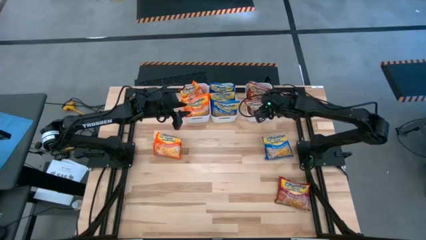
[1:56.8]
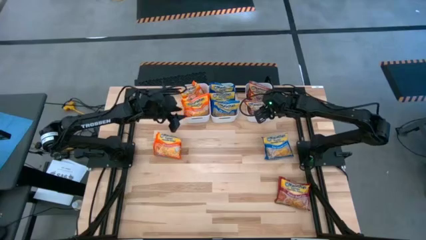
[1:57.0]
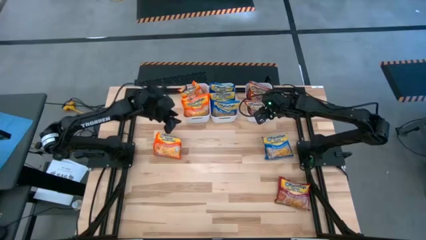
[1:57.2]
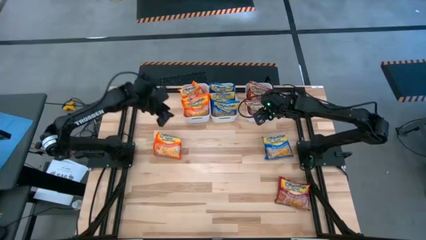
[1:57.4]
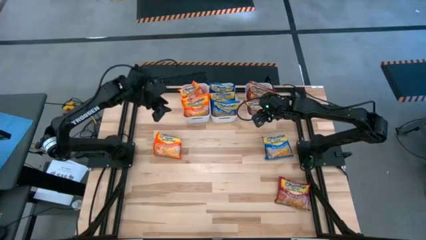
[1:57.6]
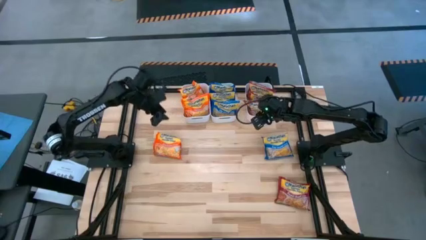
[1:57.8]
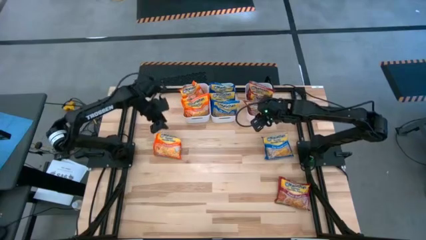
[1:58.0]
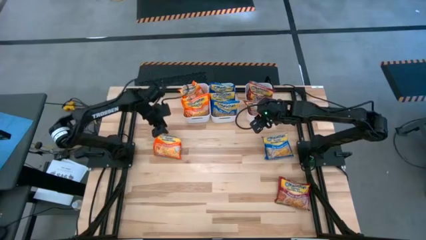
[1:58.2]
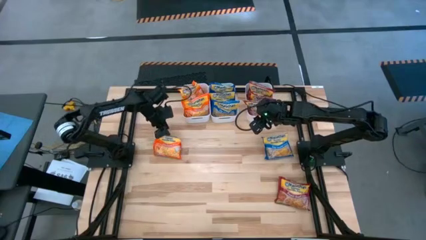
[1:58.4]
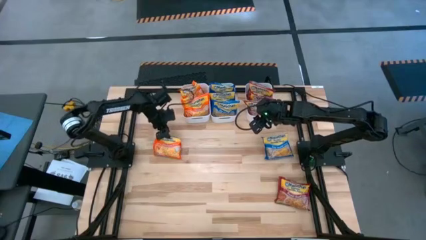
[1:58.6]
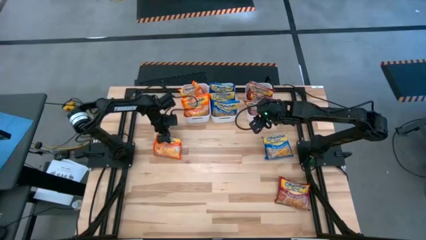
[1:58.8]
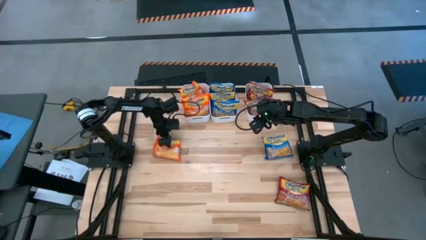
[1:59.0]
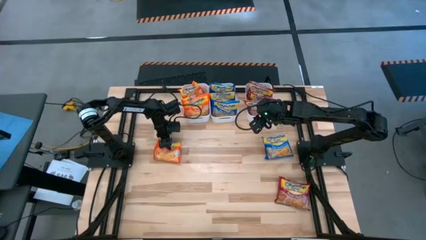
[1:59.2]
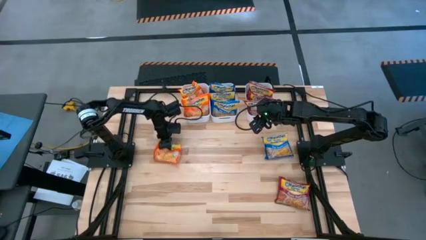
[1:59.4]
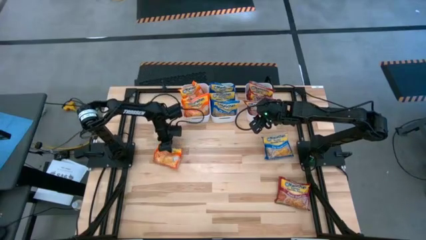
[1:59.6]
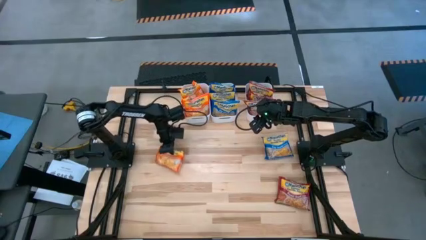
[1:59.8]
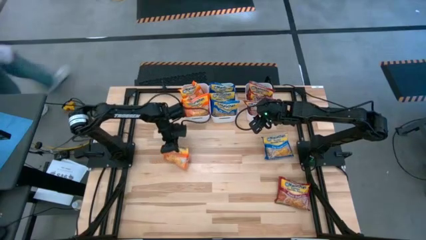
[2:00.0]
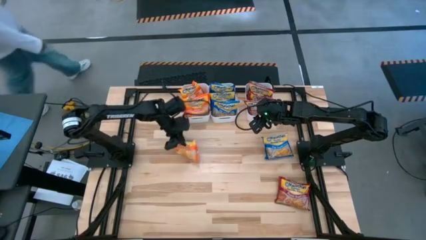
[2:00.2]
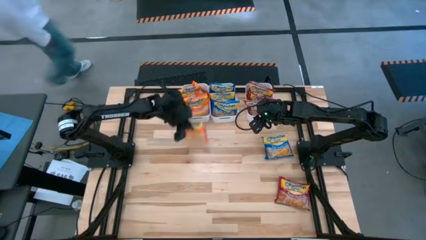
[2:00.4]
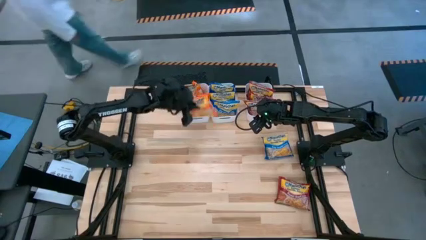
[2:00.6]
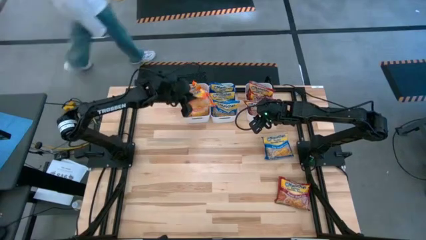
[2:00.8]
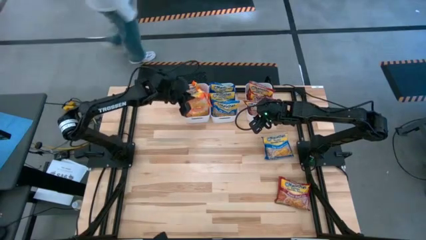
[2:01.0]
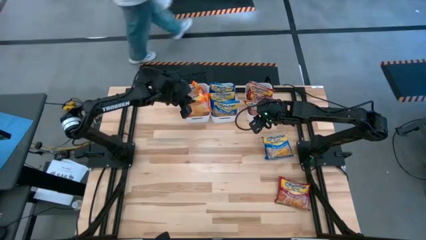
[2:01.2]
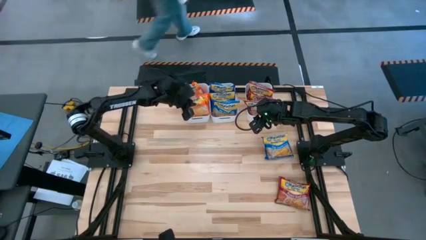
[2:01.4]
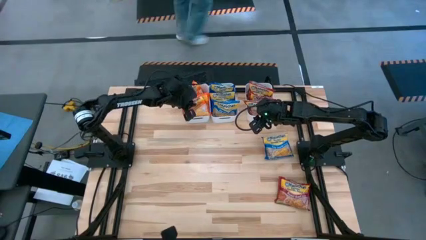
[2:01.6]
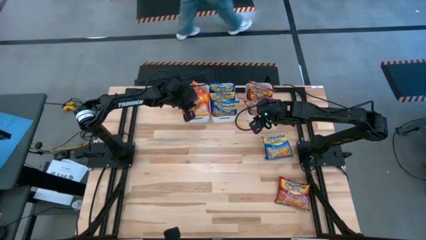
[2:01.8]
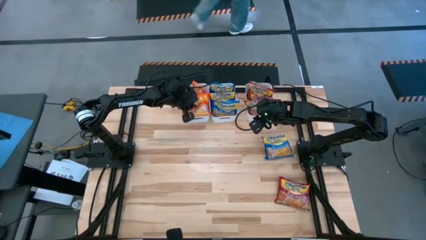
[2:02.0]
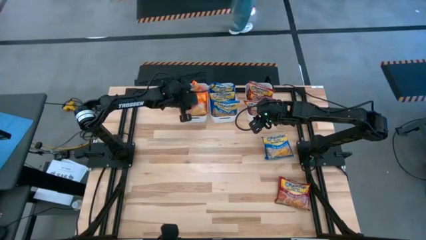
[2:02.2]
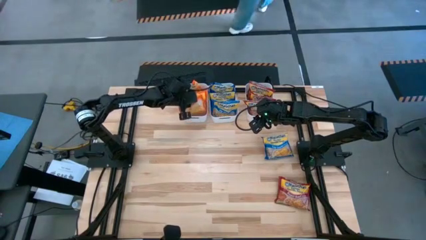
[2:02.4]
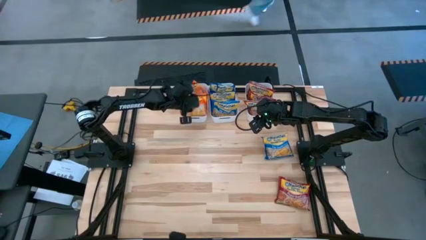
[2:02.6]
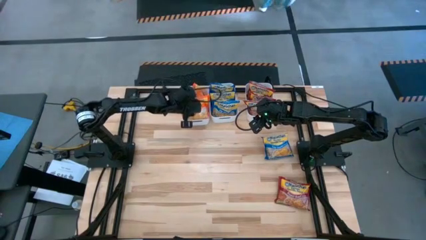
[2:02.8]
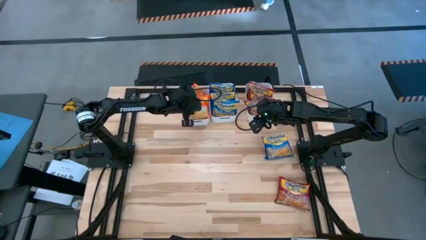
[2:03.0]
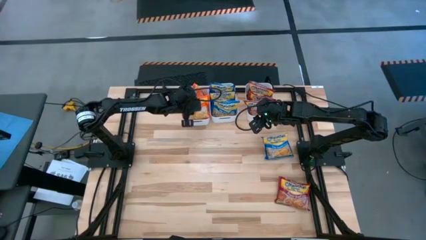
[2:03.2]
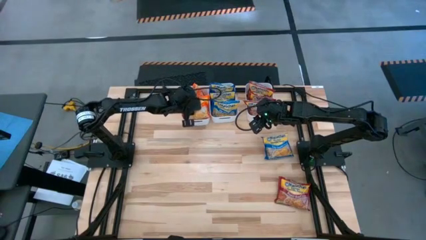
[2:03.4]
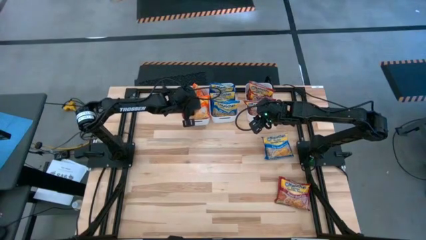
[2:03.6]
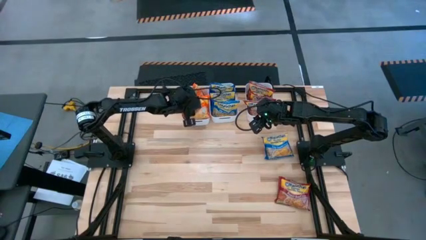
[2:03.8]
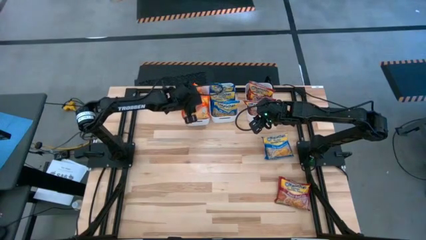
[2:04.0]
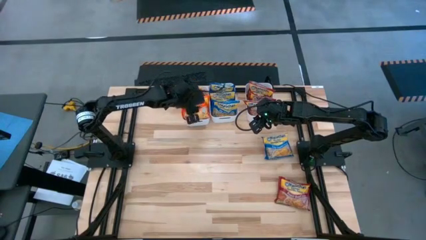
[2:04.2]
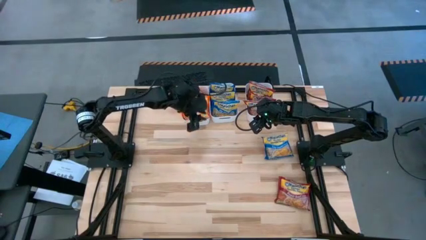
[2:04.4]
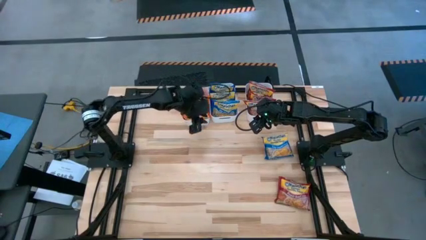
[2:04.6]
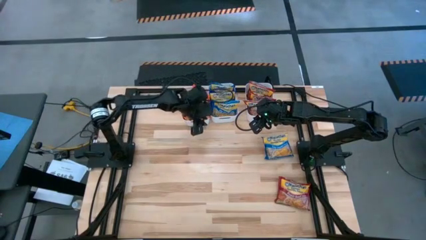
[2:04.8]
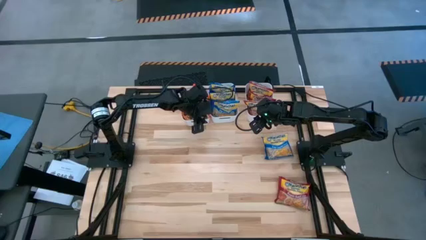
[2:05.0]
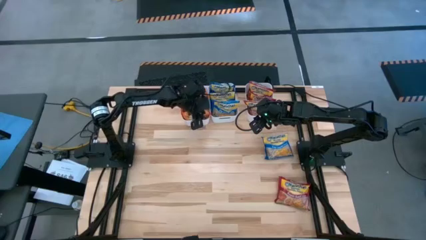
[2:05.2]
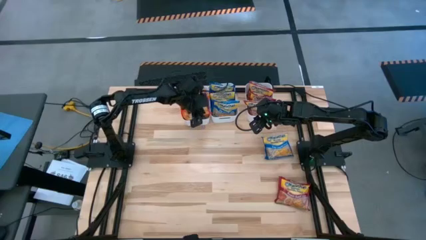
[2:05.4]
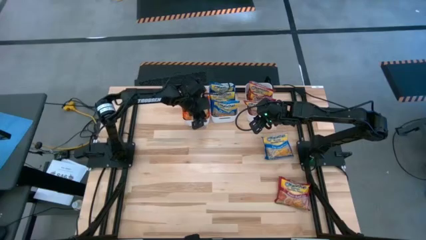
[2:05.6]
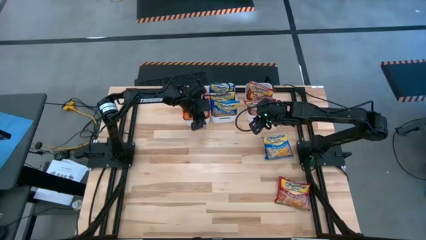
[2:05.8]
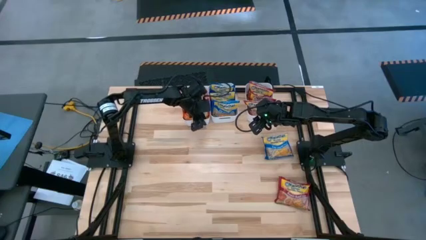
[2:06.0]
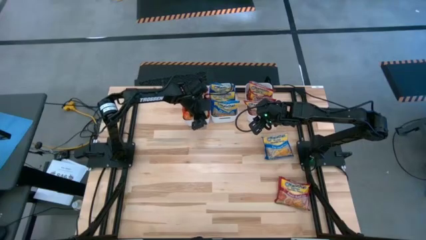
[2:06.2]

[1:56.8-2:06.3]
Task: Sort Maruchan noodles
Put the orange noodle pack into the left white bin

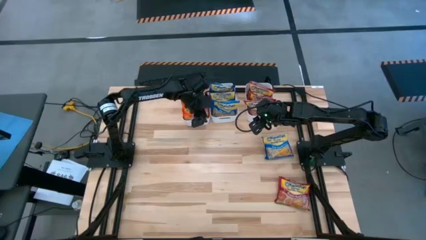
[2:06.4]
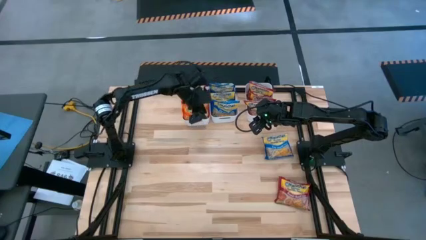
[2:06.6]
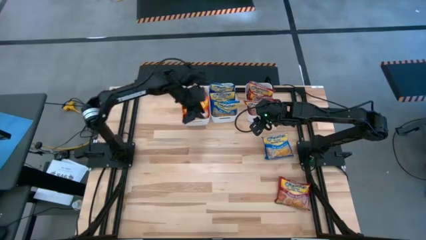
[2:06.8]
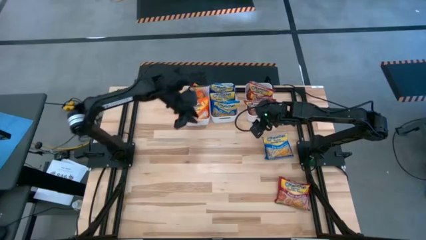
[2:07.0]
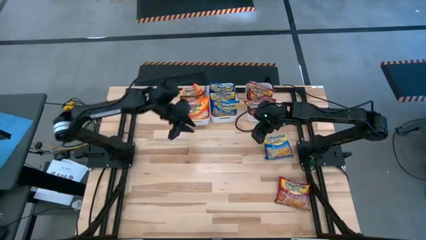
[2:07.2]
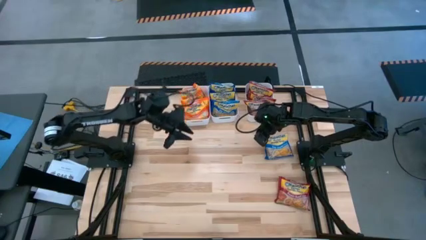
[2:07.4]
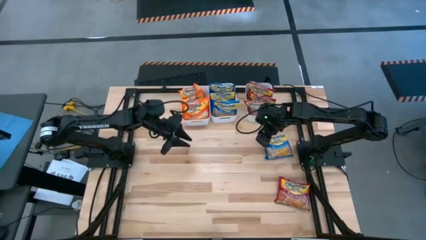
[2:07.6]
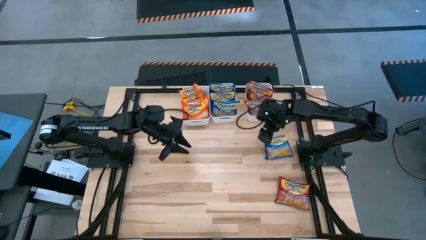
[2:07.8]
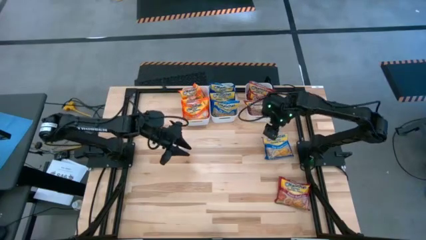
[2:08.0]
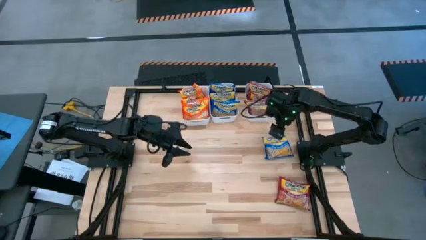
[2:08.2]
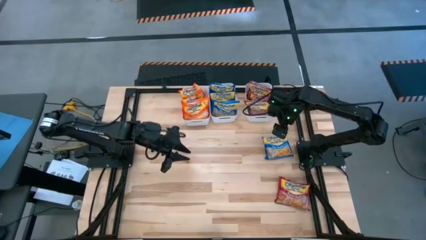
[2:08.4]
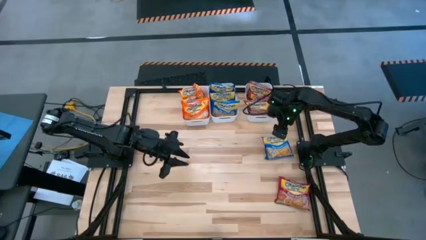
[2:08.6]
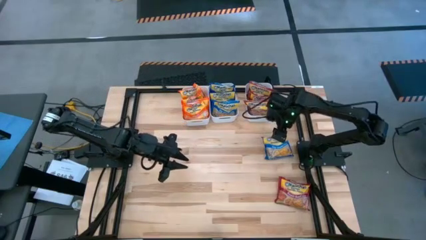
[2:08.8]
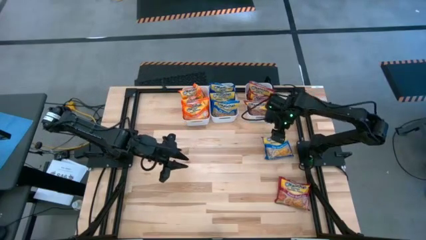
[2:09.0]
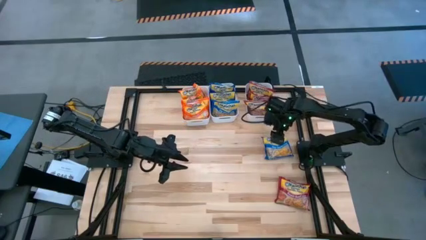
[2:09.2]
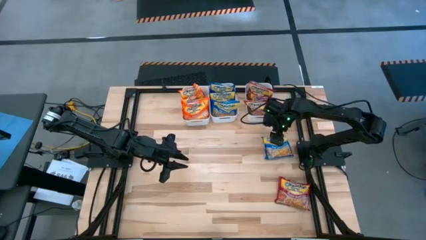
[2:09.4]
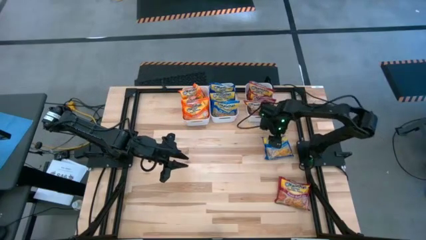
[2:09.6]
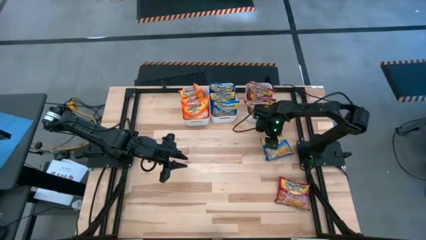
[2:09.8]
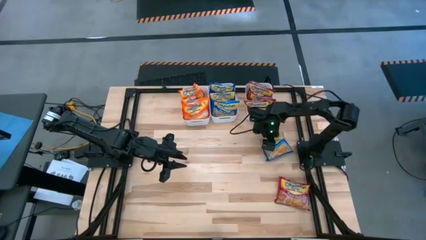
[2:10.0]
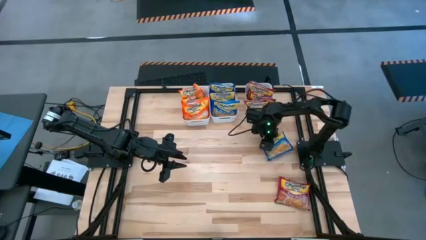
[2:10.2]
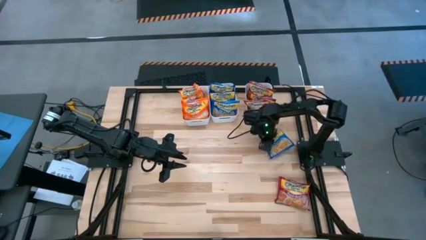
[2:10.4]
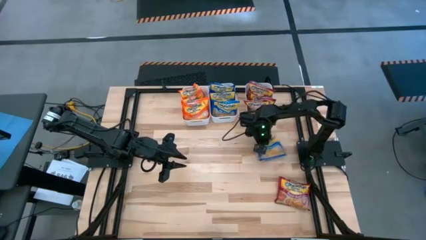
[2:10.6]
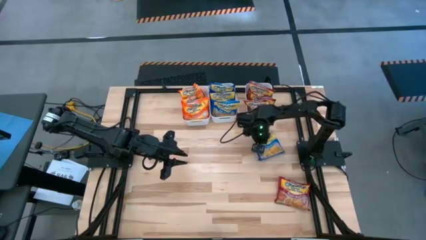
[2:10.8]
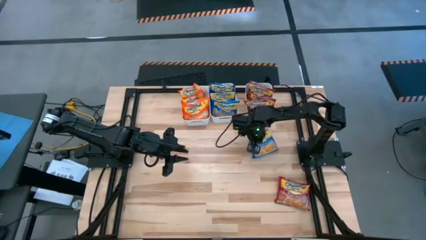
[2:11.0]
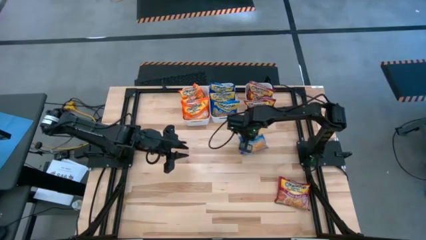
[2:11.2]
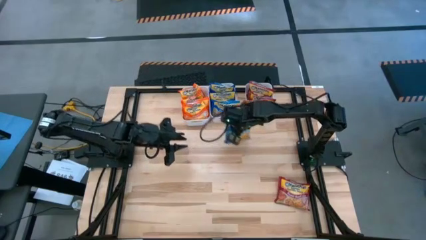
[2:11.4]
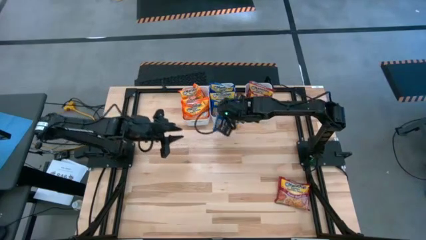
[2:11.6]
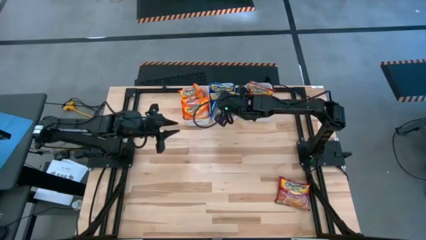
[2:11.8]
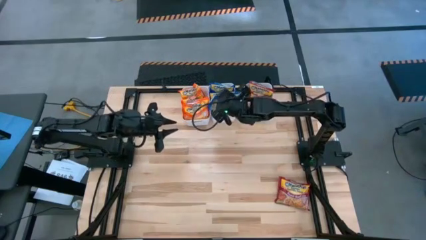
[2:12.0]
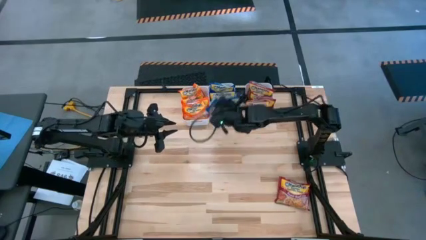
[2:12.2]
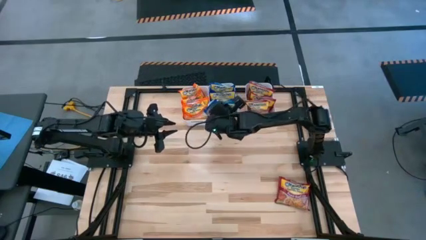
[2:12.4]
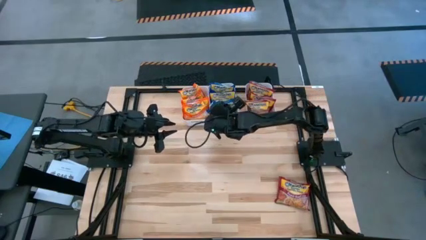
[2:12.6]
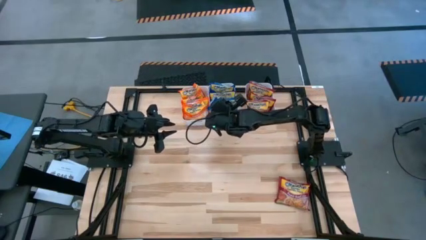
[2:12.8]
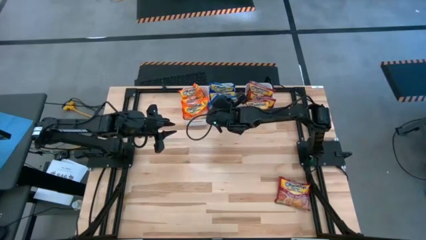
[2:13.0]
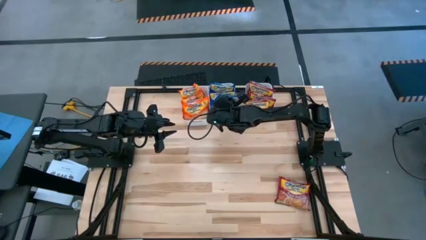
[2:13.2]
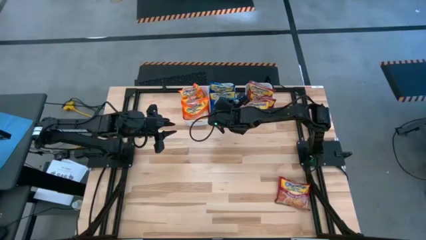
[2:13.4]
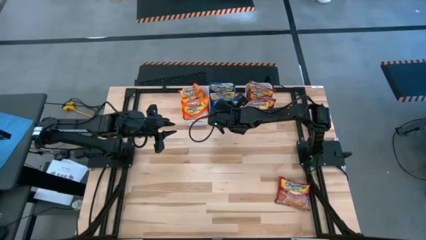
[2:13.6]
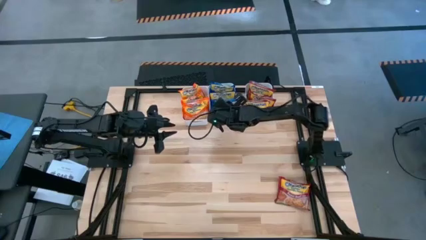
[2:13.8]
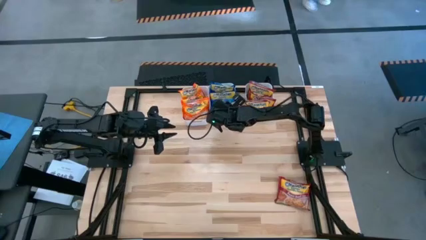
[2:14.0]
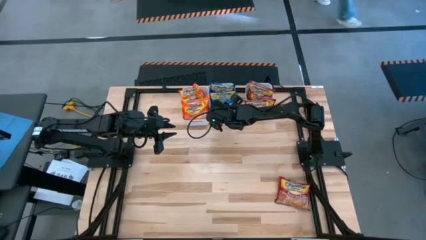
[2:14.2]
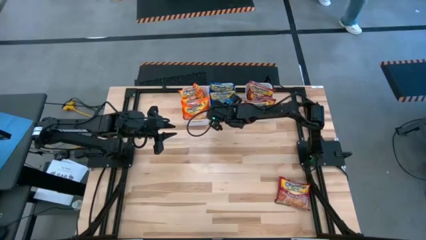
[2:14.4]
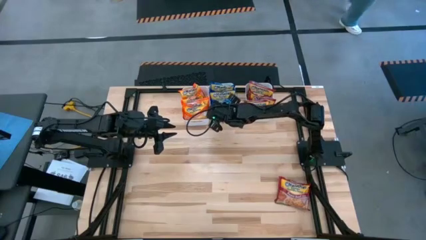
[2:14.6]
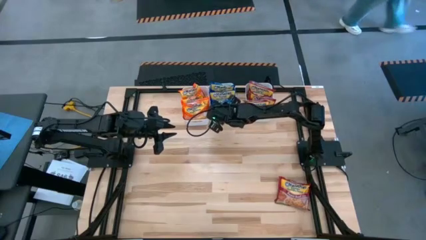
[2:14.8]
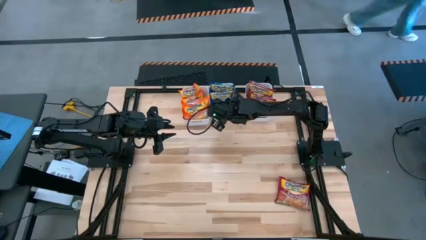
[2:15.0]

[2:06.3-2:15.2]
Put the blue noodle pack into the middle white bin
